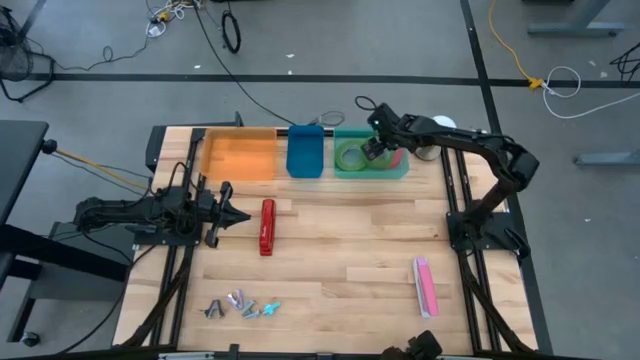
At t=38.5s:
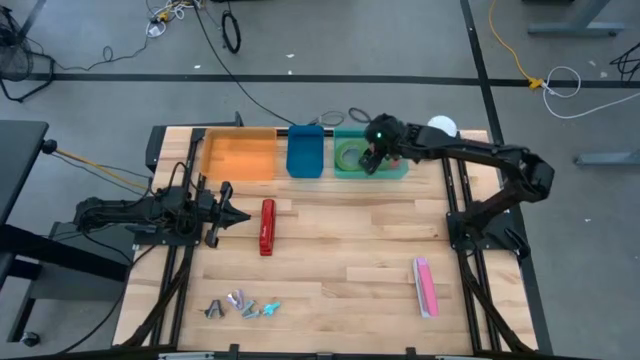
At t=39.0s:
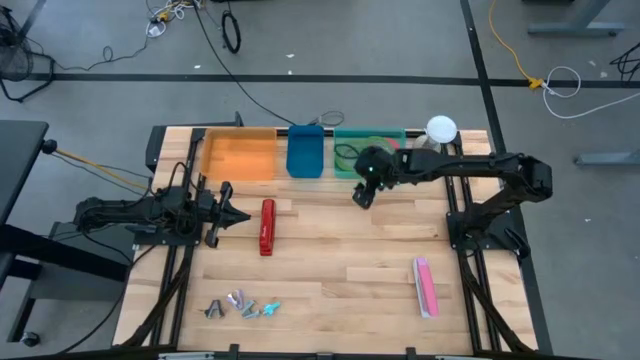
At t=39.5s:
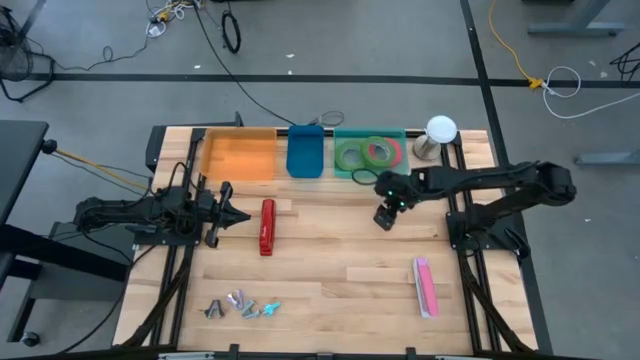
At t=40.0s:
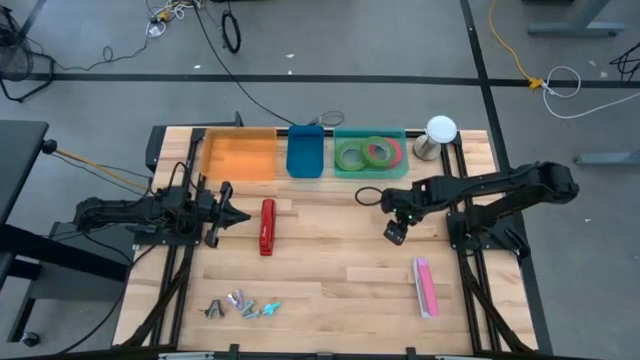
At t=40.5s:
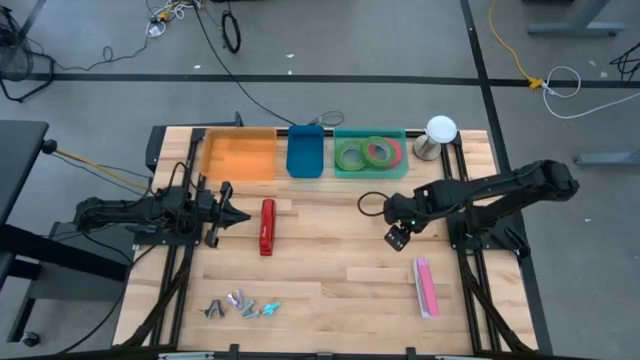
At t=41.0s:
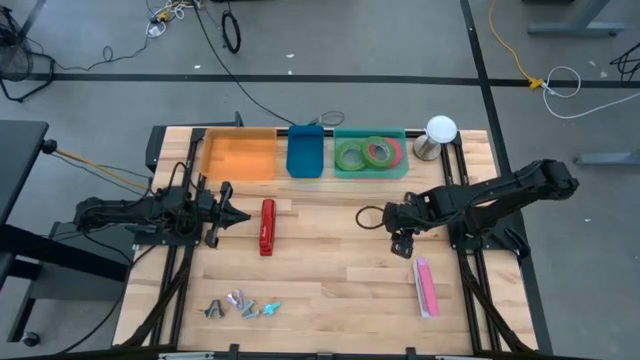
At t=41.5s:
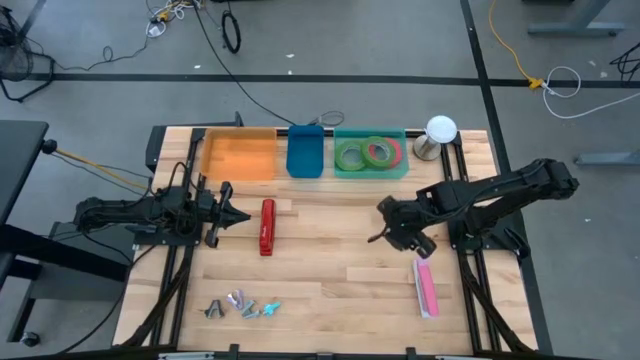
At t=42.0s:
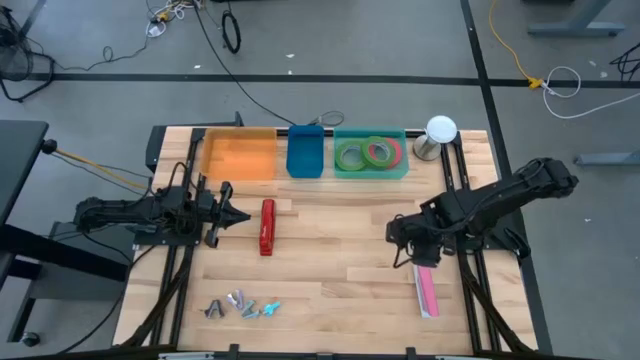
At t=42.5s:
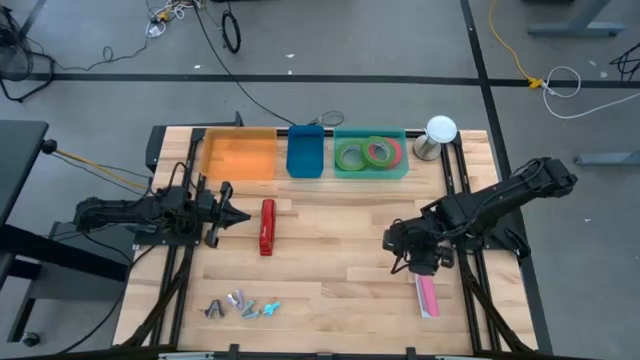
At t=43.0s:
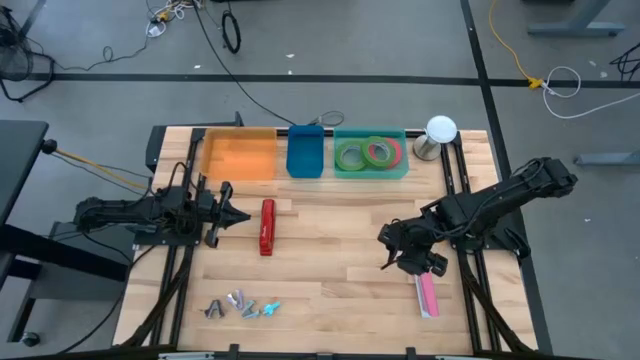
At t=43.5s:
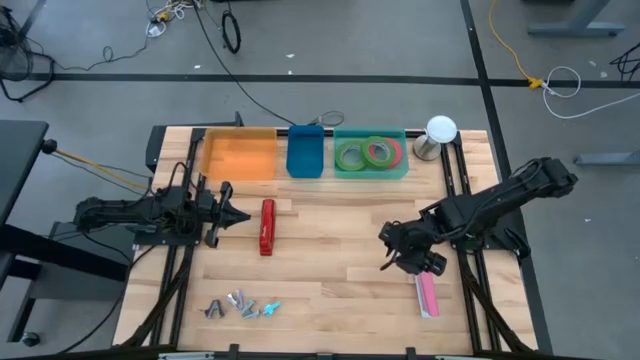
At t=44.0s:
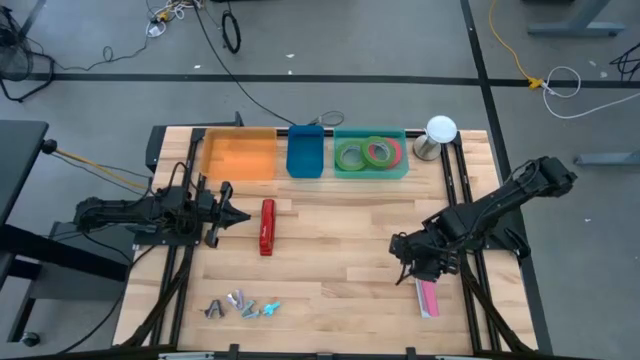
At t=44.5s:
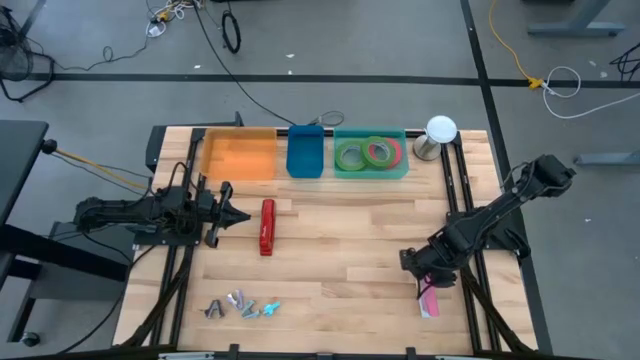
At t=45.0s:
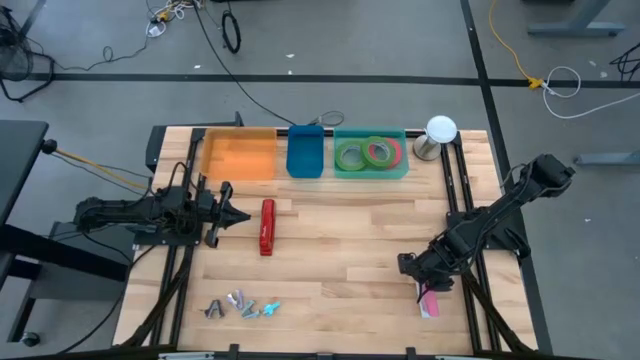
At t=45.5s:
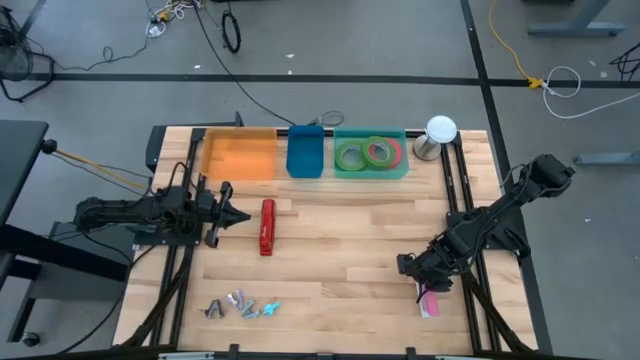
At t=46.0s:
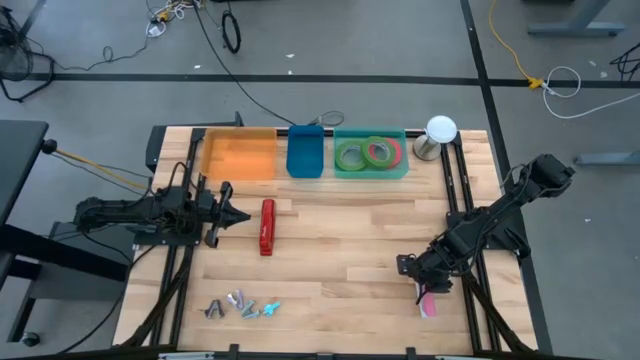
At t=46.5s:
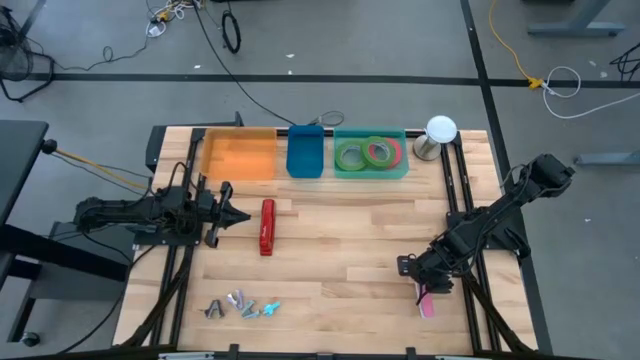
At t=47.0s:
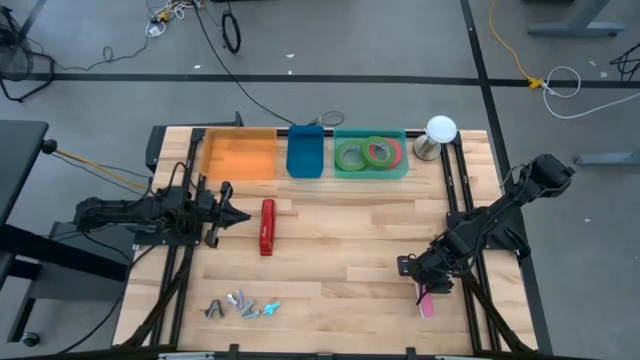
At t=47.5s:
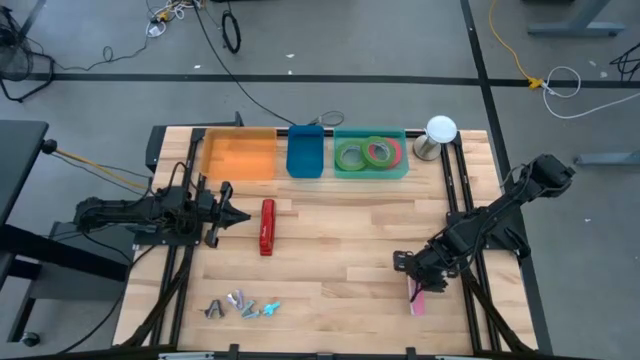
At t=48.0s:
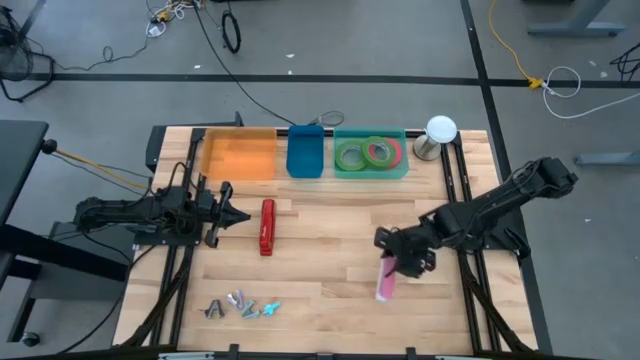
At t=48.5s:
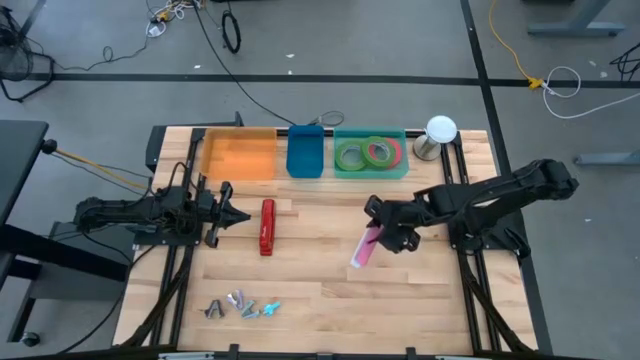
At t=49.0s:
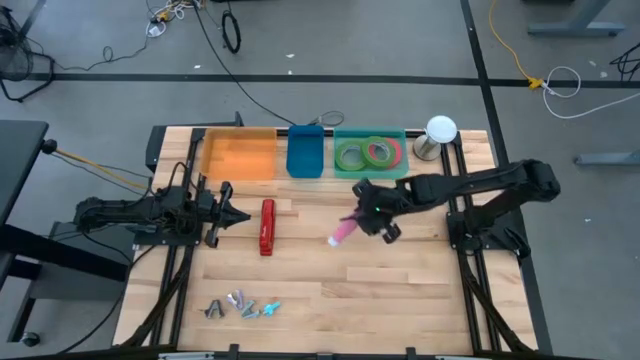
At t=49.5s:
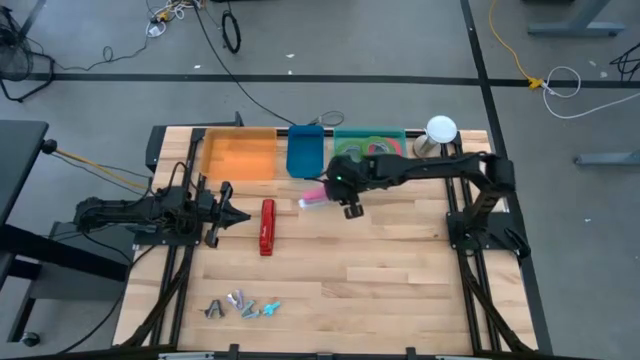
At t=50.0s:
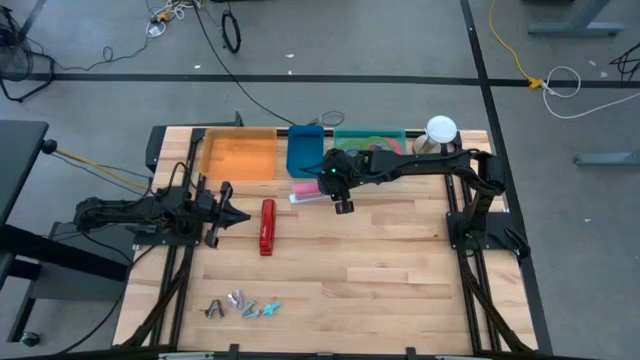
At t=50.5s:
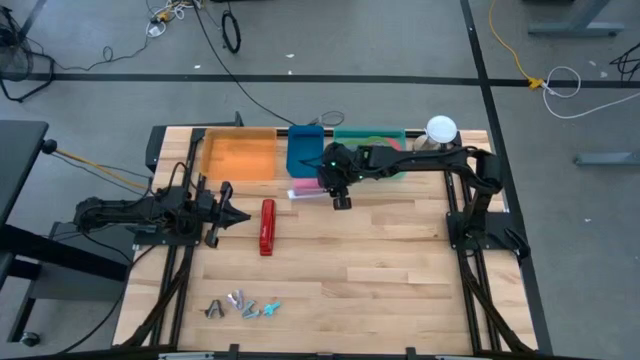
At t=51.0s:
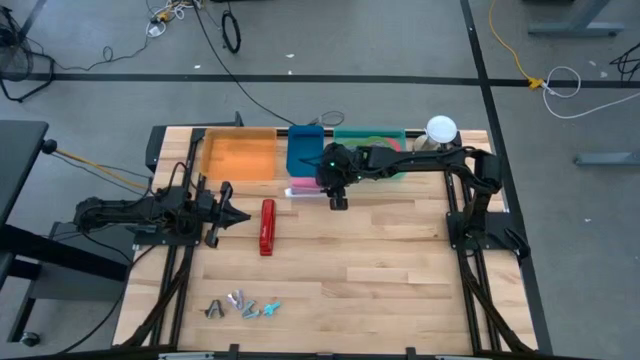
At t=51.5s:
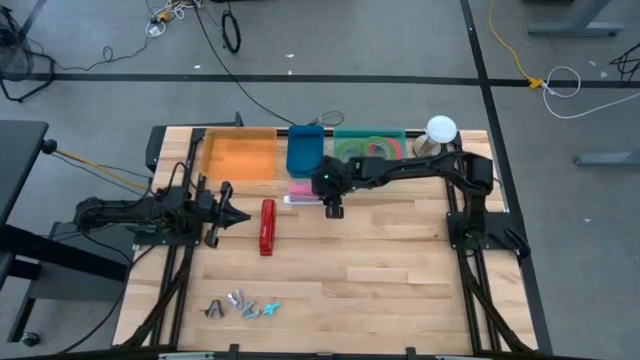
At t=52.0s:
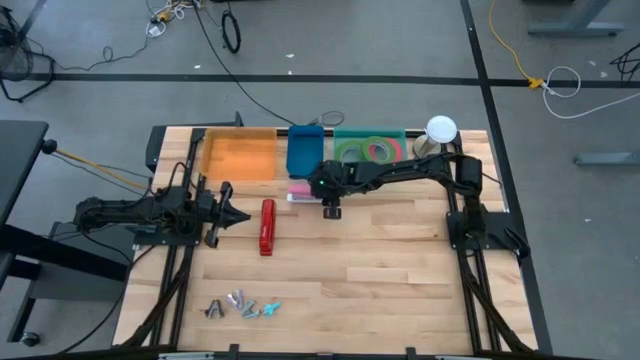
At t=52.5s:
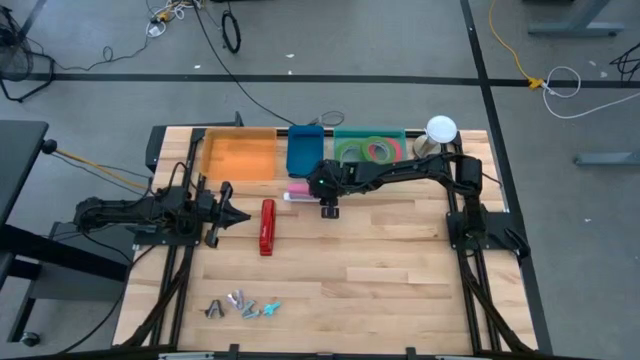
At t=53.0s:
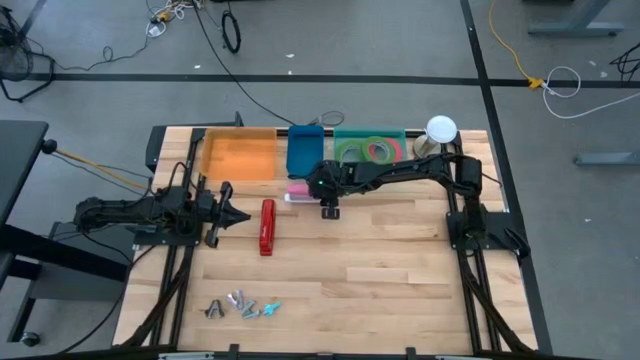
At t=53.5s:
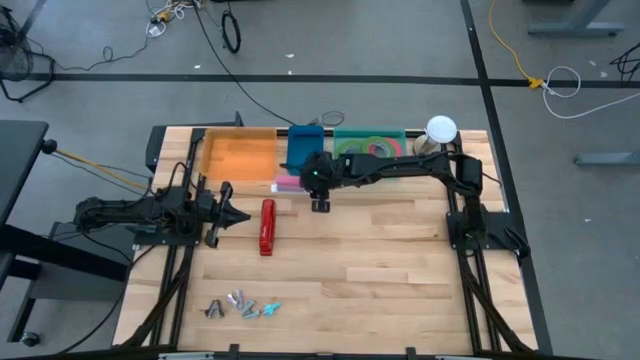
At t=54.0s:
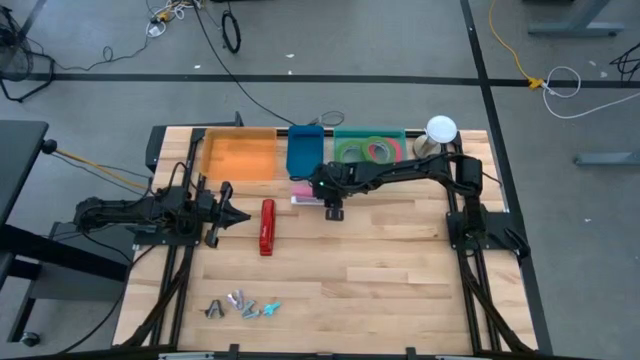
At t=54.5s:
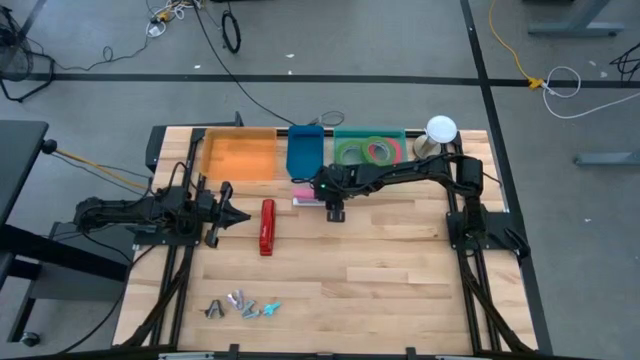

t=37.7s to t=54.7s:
Task: Pick and place Stapler, Stapler remover, tape
Move the pink stapler to the center of the table

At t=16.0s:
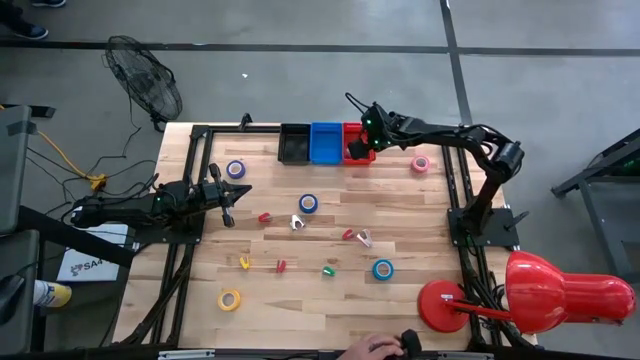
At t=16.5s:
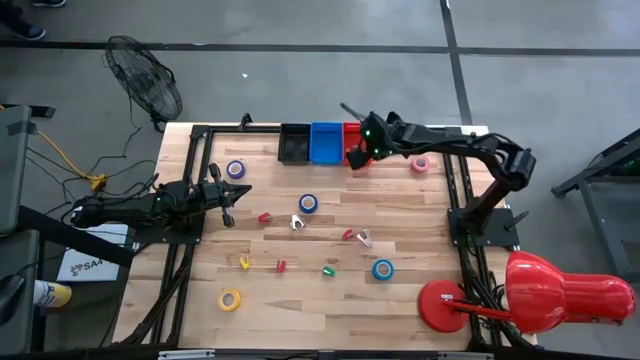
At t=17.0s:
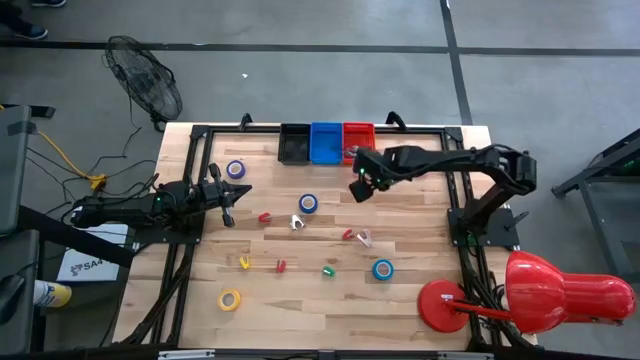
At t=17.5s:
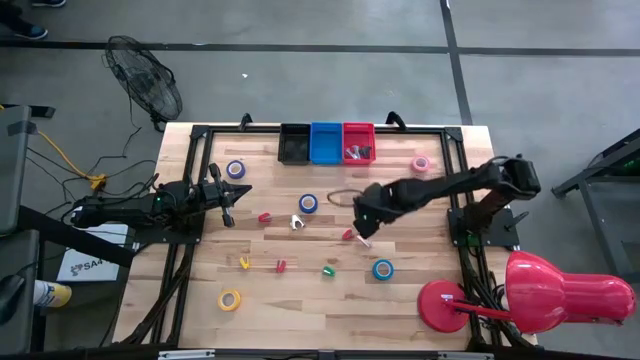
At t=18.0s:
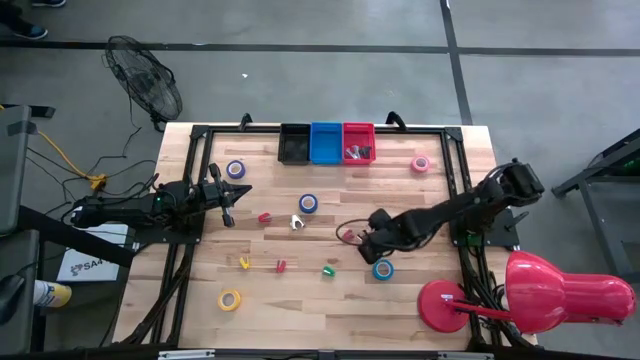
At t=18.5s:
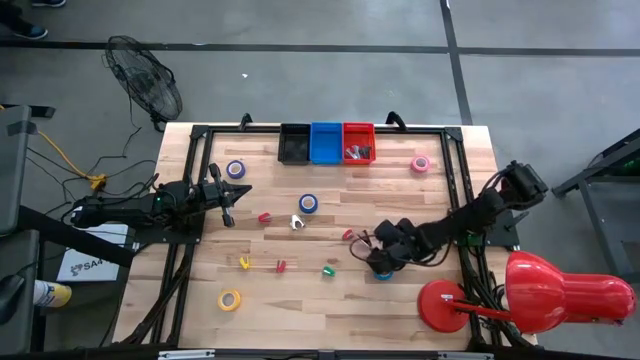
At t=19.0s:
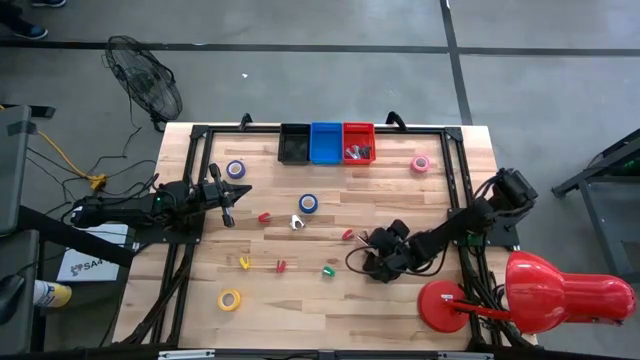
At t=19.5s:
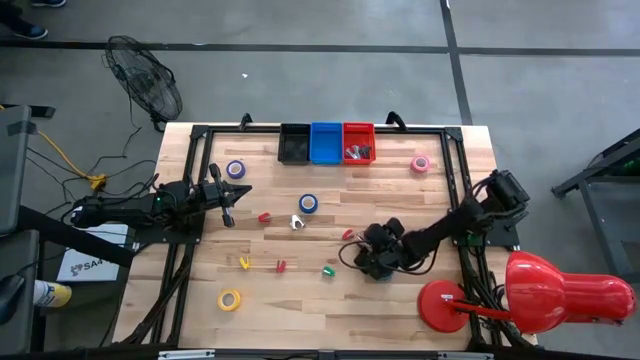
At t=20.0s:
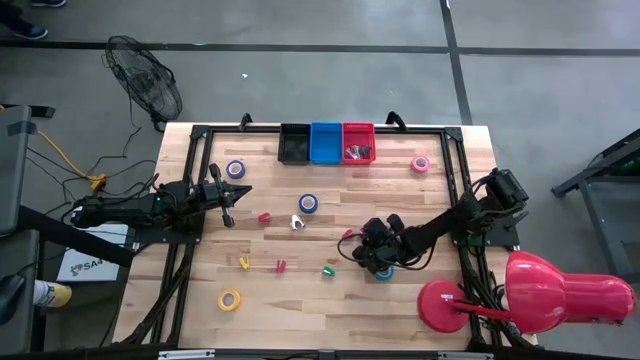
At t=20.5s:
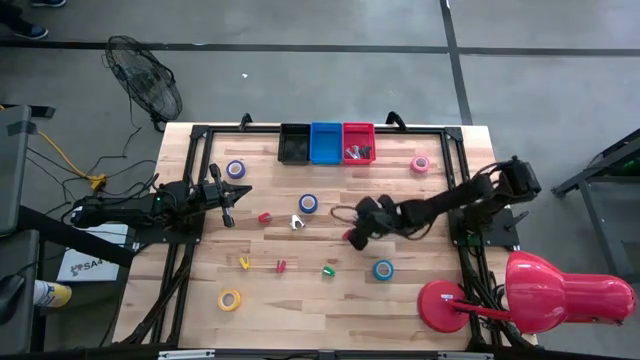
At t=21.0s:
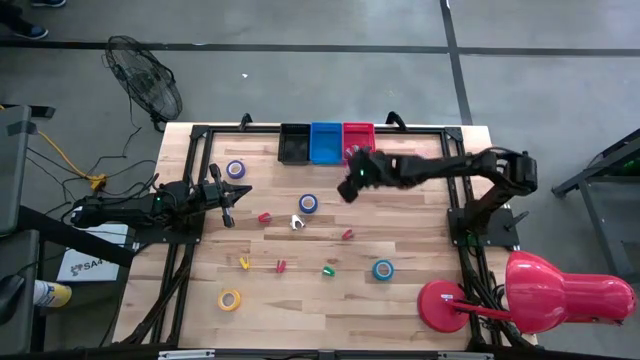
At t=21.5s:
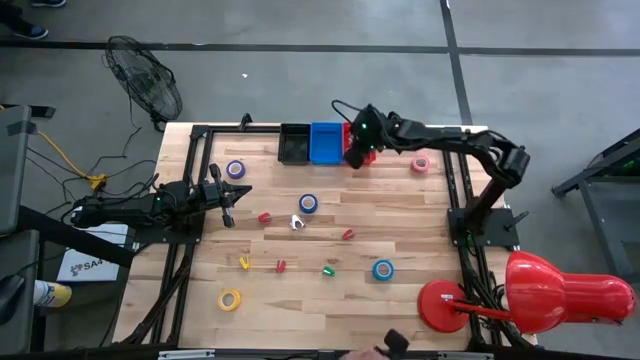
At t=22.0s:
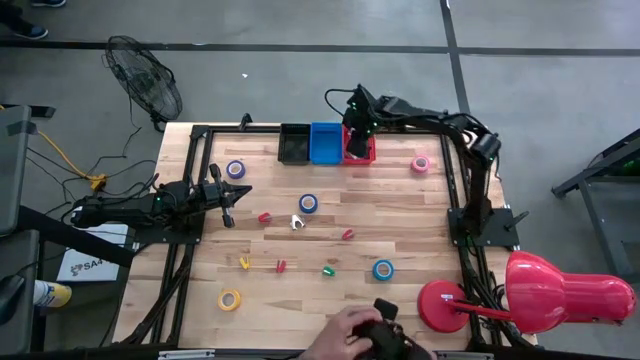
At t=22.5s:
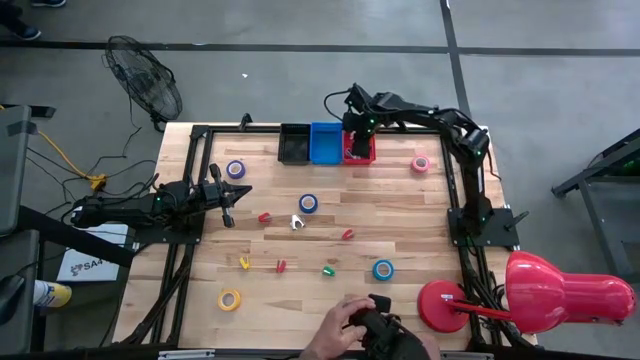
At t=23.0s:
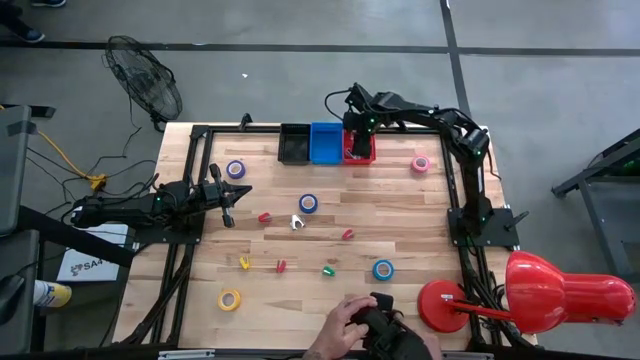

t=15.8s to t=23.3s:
Task: Pick and place Stapler, Stapler remover, tape
Put the pink staple remover into the red bin
